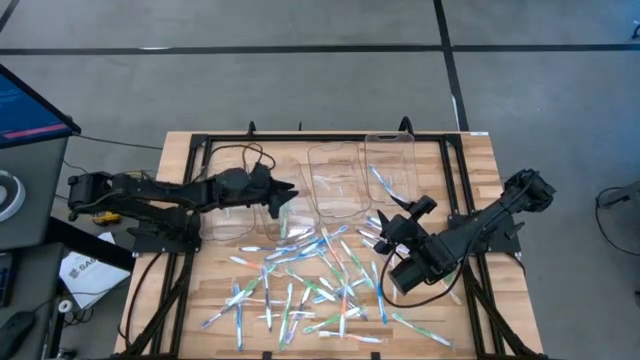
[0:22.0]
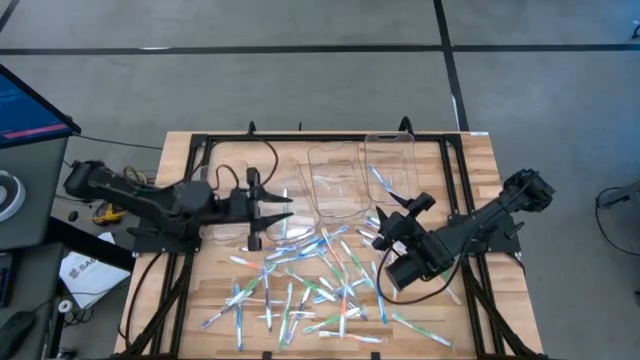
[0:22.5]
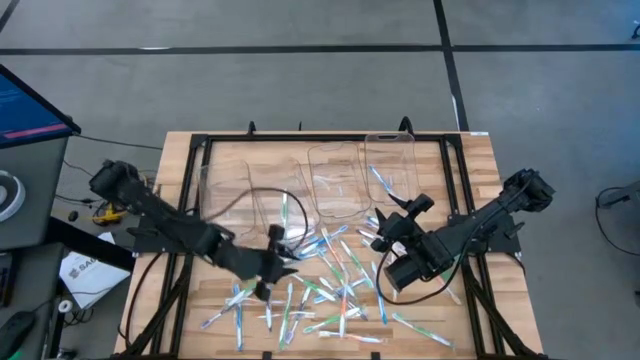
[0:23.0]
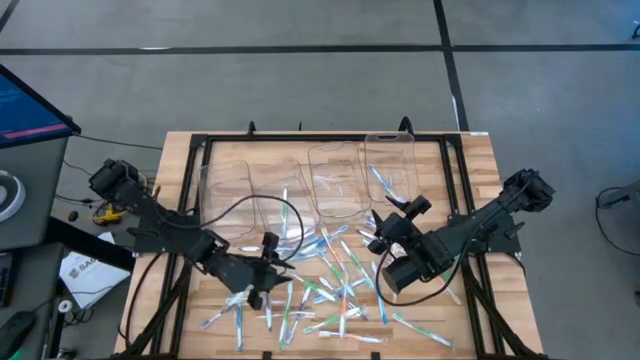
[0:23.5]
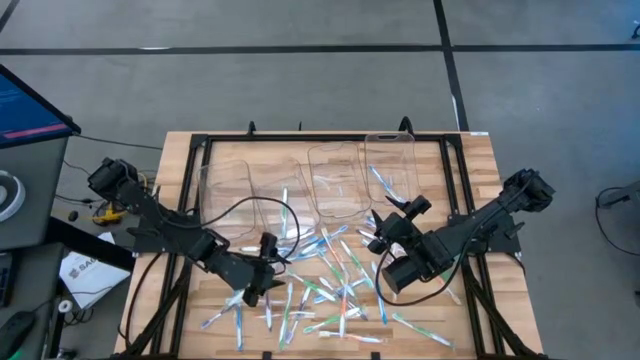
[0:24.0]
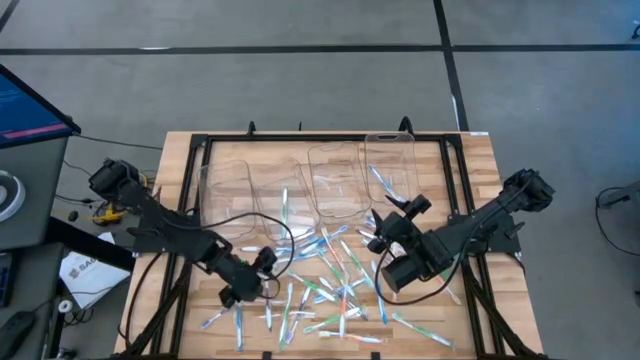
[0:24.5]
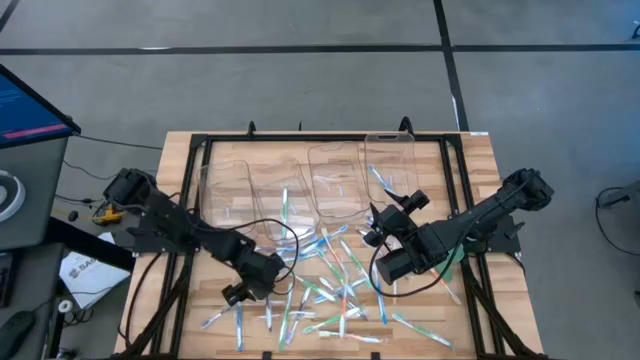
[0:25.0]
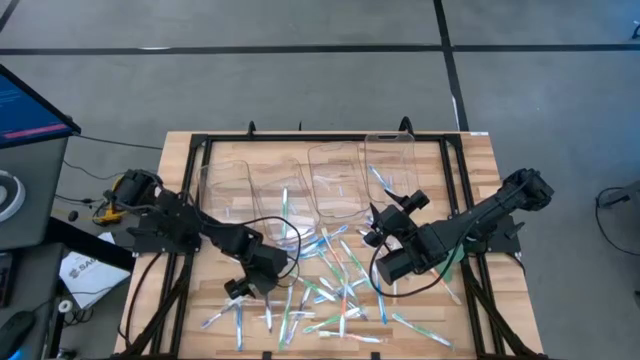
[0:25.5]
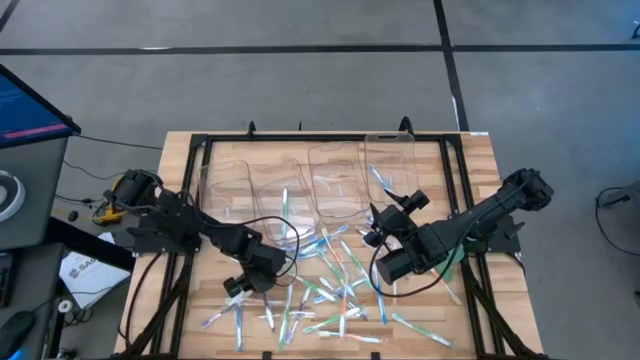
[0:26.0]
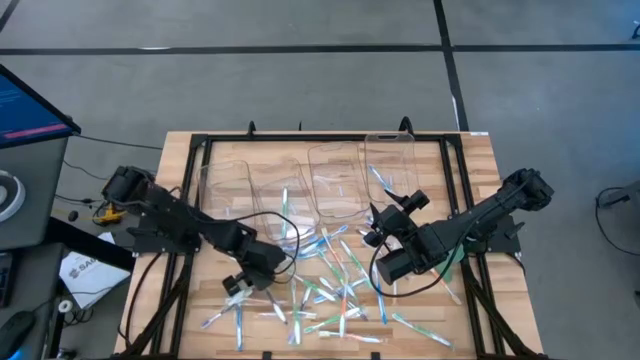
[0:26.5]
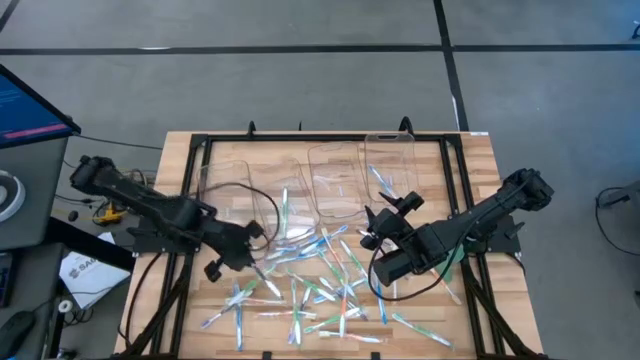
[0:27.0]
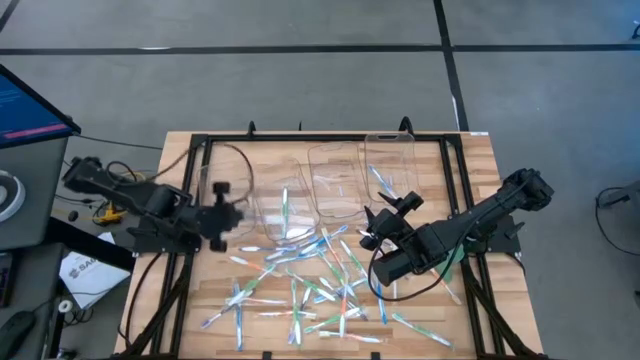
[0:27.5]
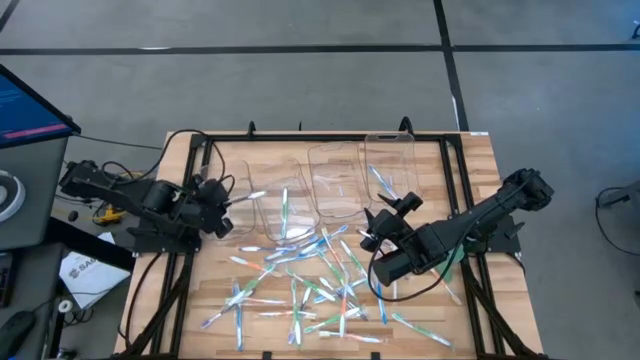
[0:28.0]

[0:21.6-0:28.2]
Task: Pick & Place Toothbrushes
Put the violet toothbrush into the left transparent bin

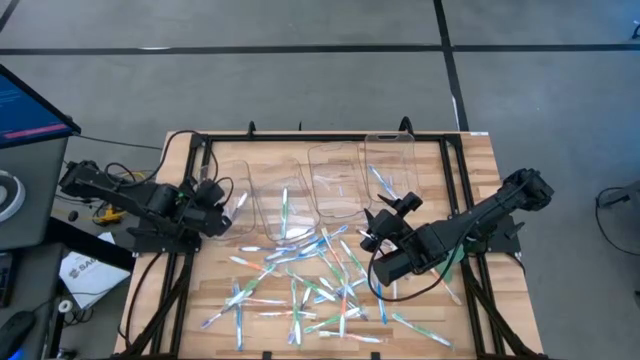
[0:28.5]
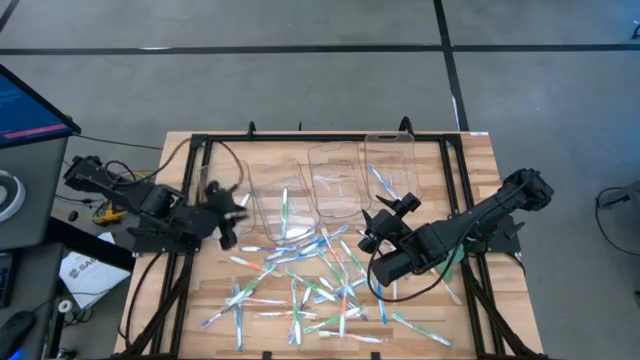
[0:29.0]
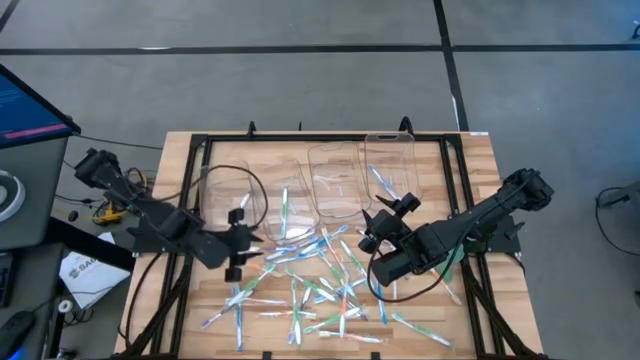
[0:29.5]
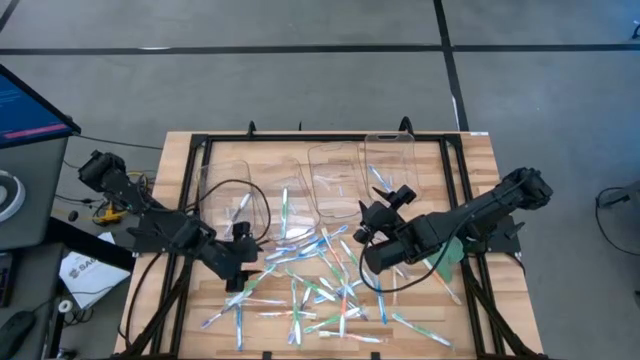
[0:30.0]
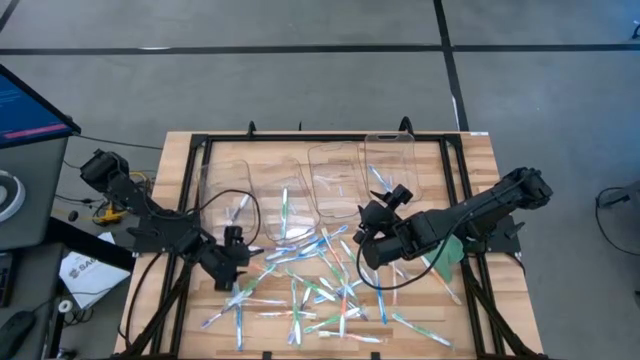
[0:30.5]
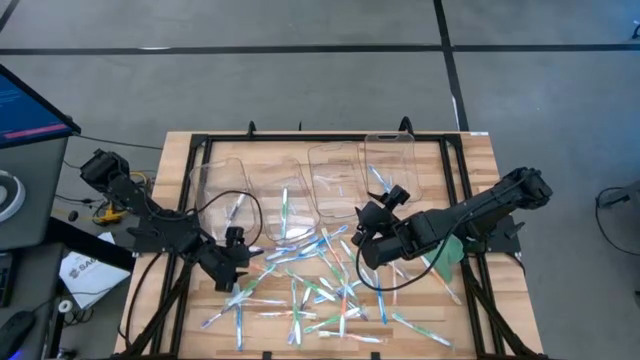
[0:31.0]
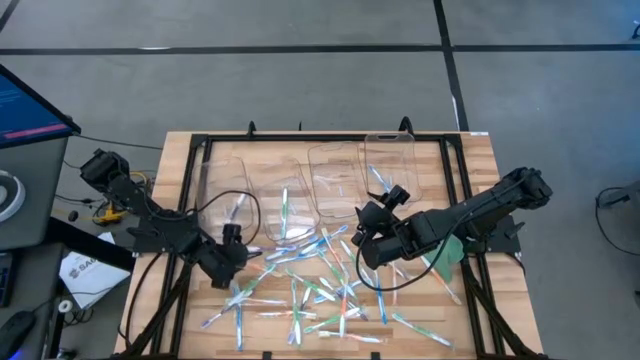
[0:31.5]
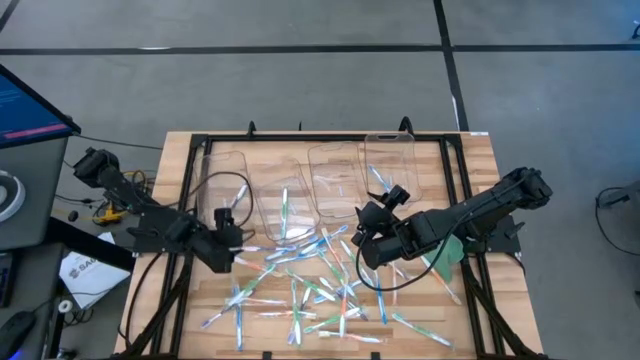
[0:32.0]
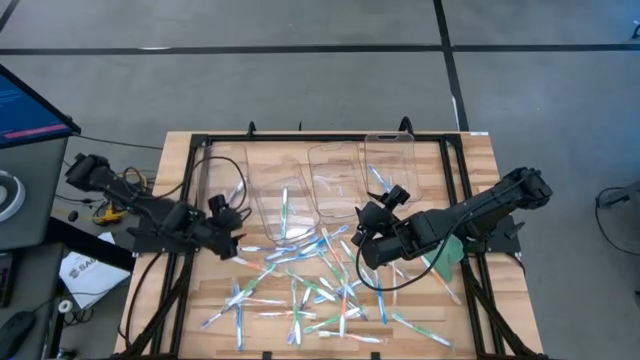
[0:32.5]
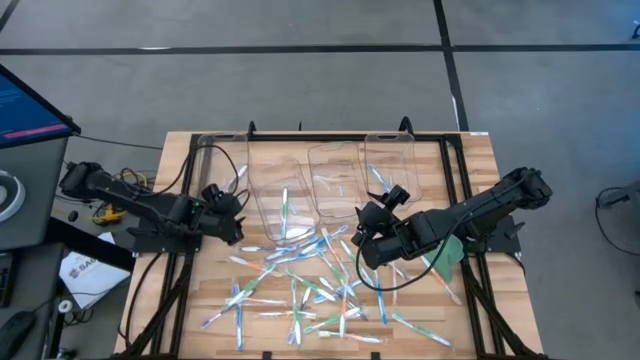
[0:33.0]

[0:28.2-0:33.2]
Adjust the left transparent bin

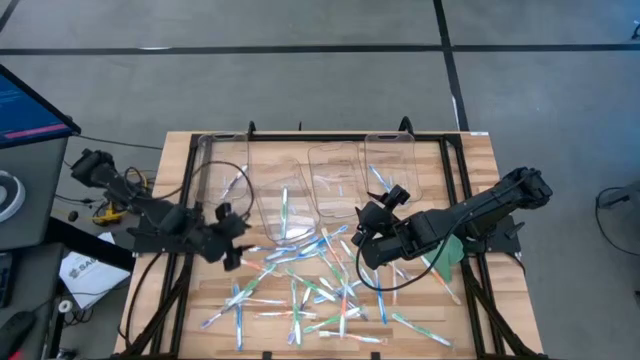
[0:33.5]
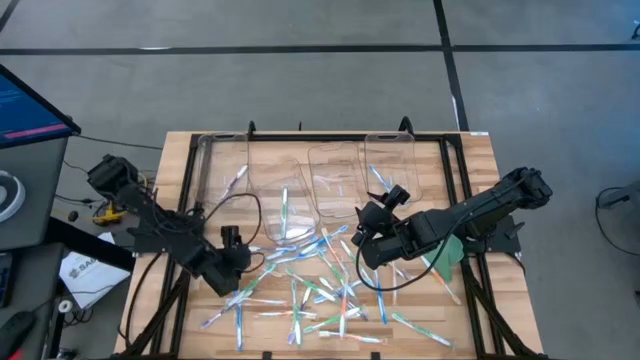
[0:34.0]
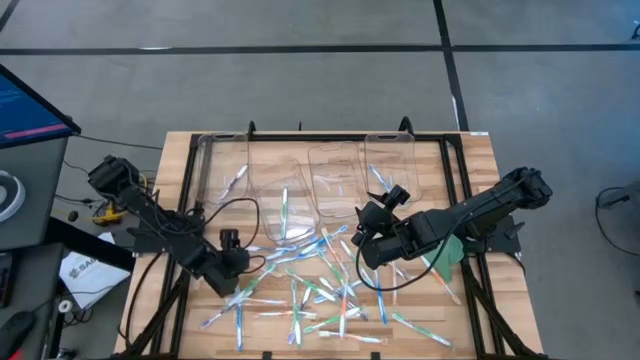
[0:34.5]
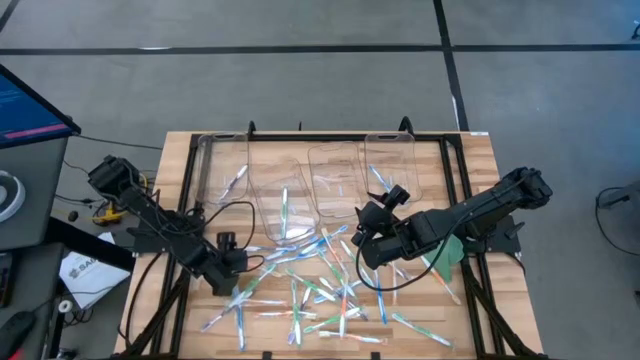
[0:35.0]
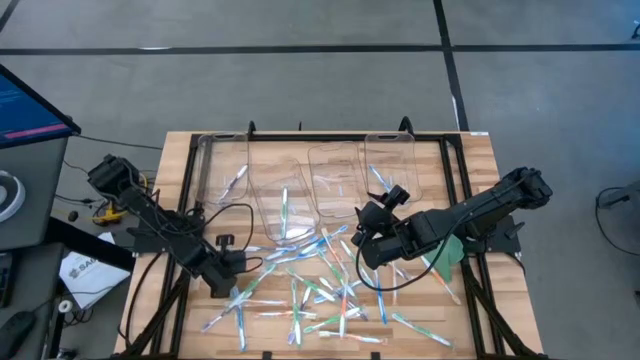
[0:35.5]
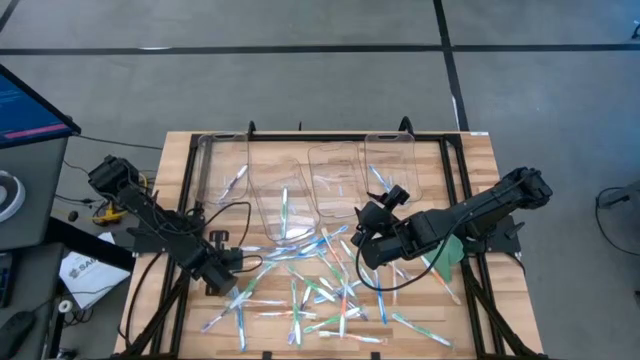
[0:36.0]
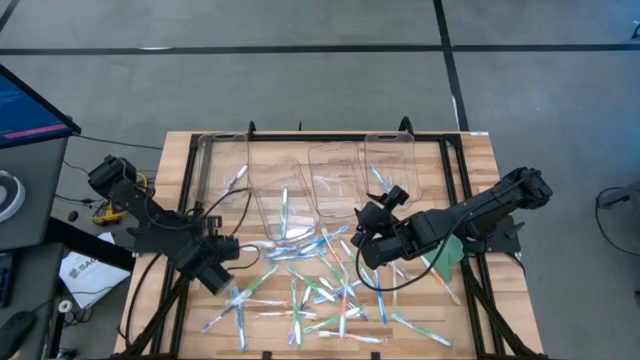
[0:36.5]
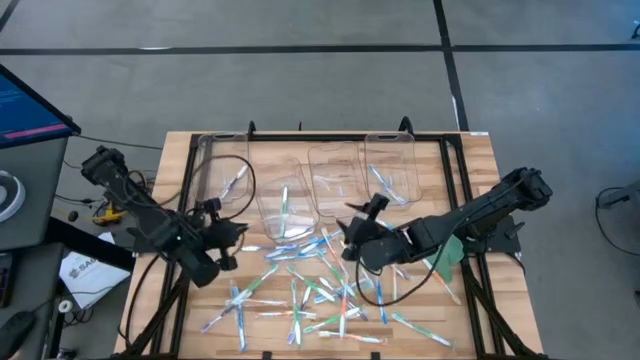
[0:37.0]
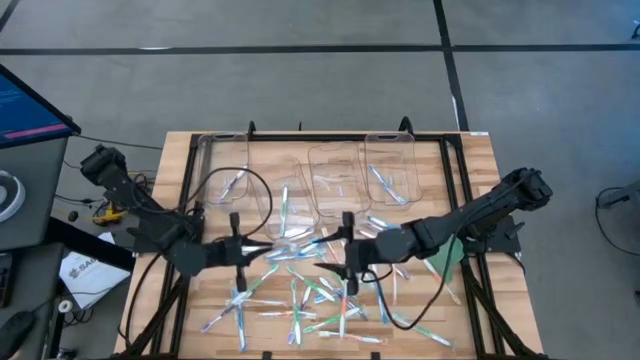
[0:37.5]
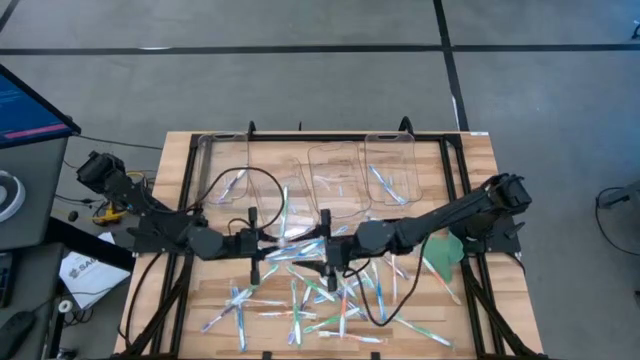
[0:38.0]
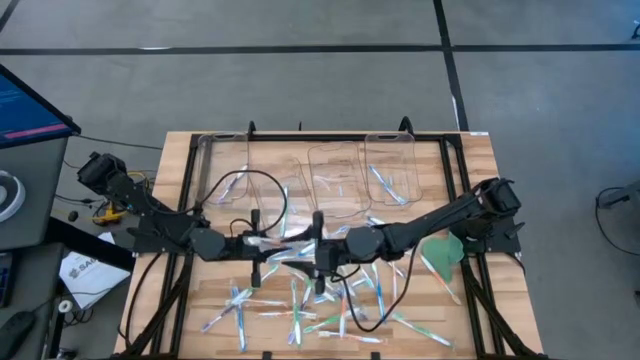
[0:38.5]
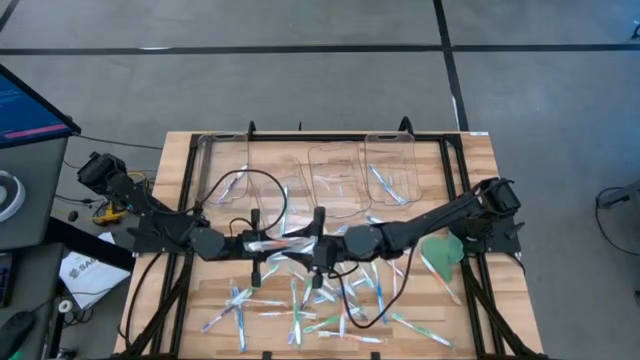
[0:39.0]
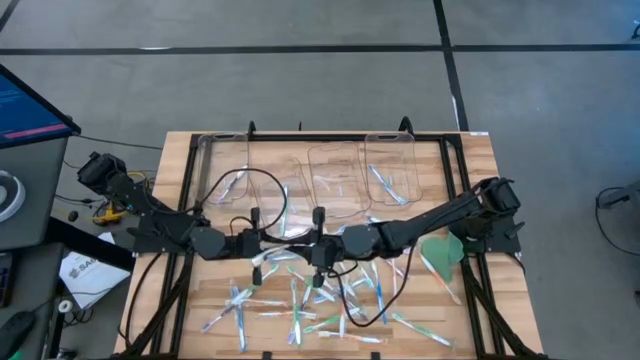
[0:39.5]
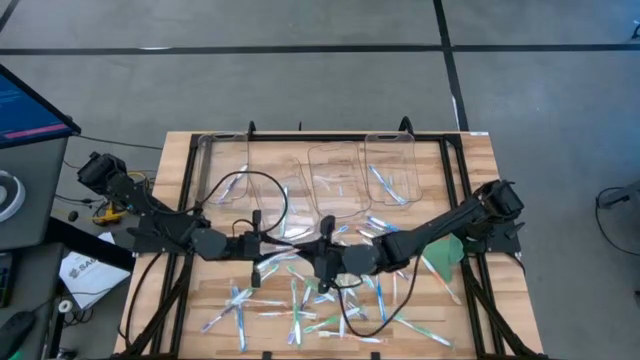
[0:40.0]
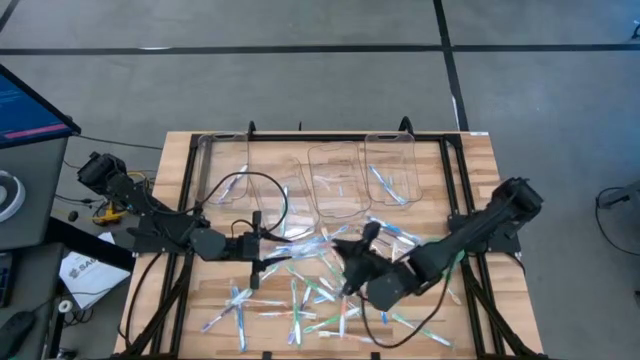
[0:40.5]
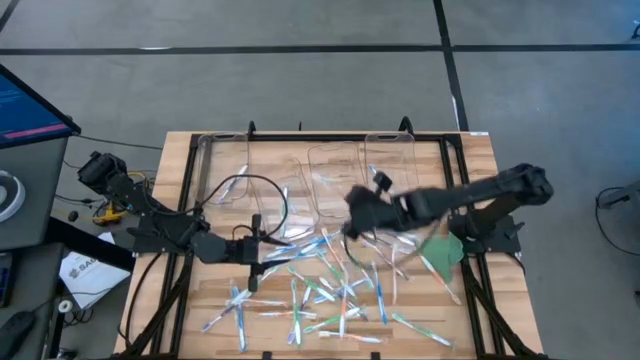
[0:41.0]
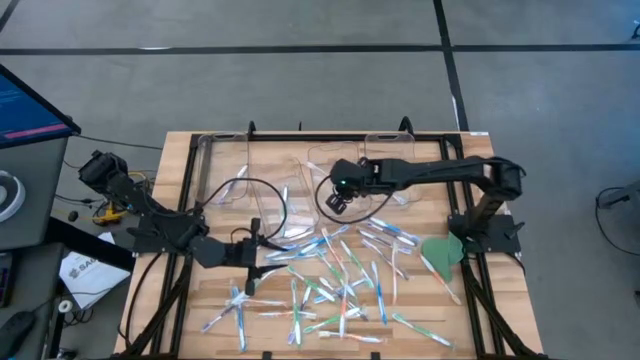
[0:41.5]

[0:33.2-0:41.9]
Put the orange toothbrush into the middle right transparent bin

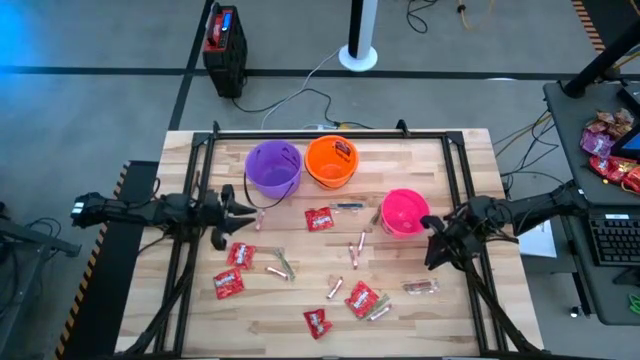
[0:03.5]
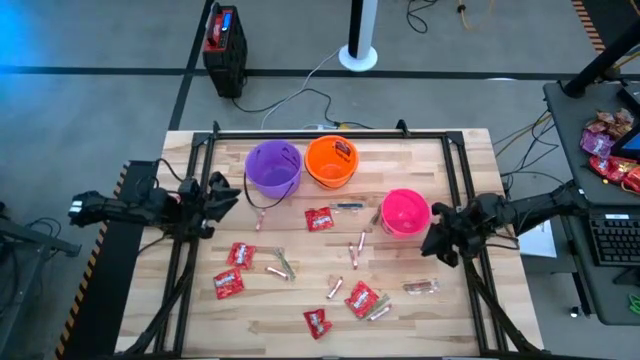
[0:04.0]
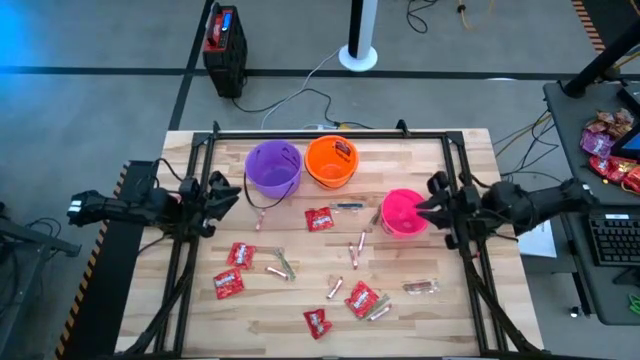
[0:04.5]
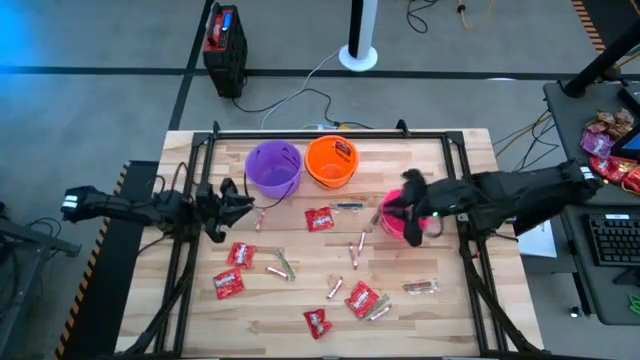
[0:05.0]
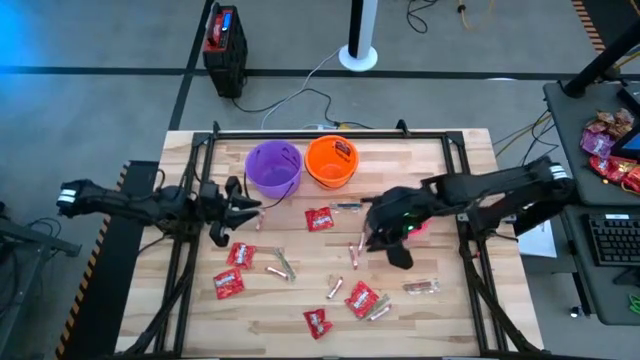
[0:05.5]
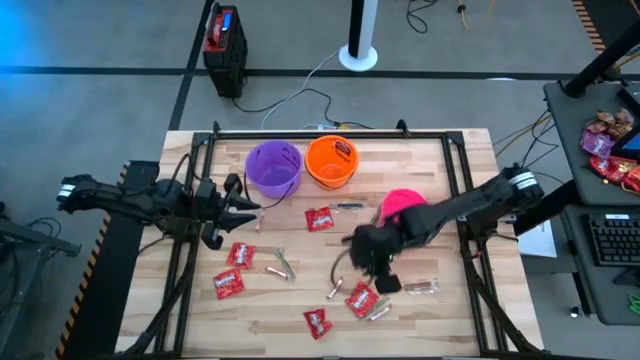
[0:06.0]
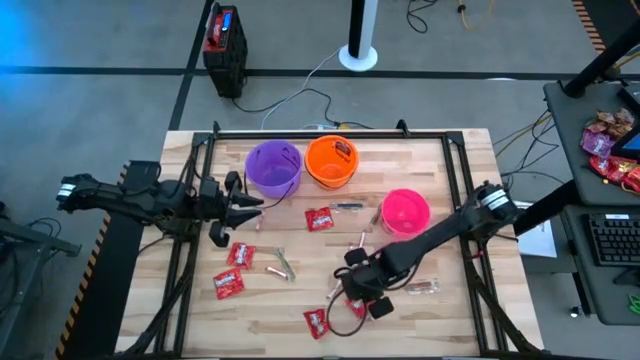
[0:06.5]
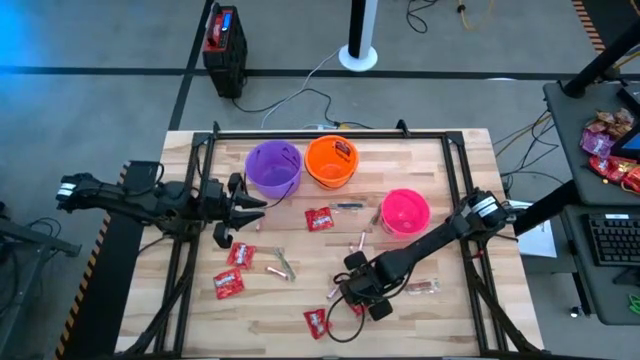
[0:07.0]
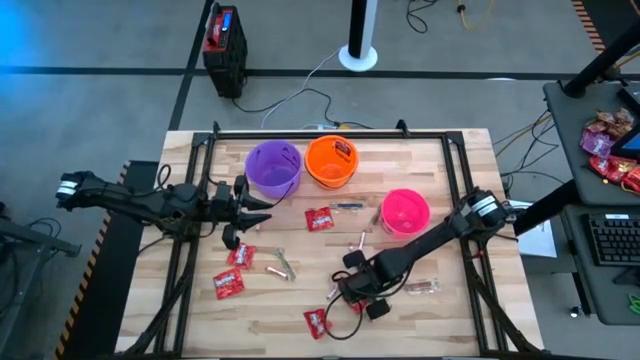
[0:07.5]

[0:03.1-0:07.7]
Task: Sort candy by brand, put in halloween buckets
Put the red candy into the pink bucket
